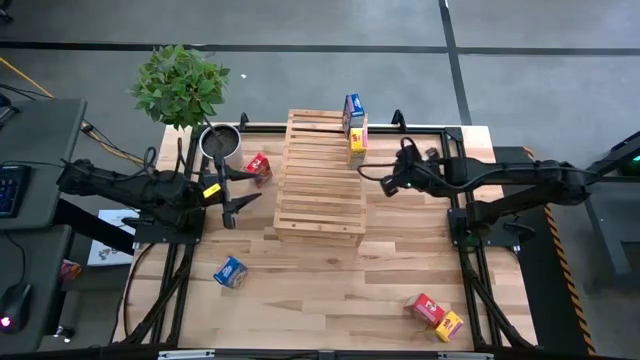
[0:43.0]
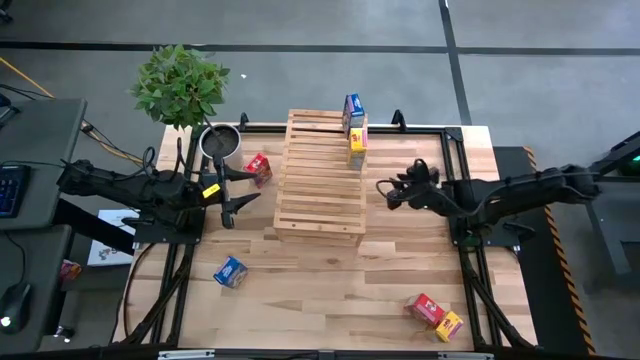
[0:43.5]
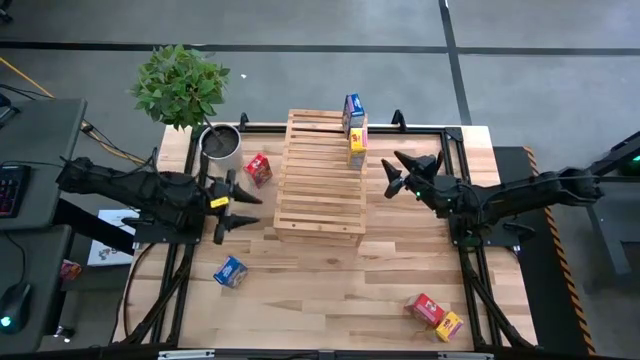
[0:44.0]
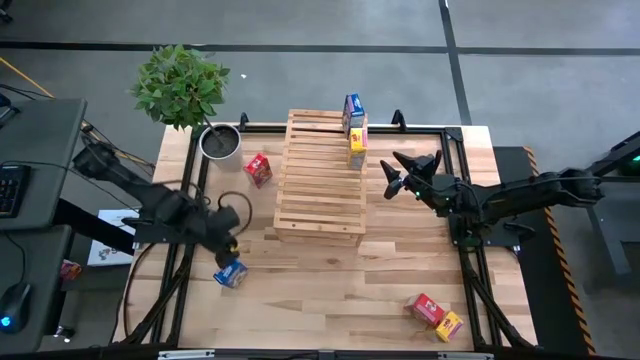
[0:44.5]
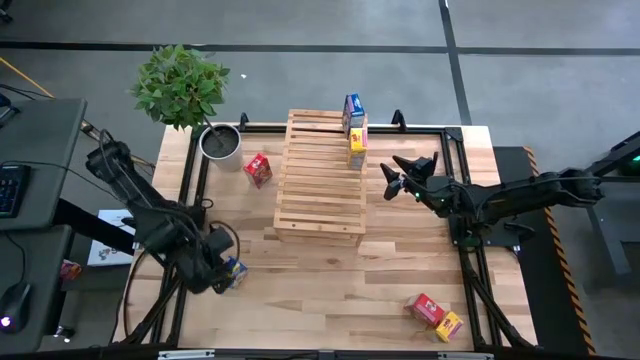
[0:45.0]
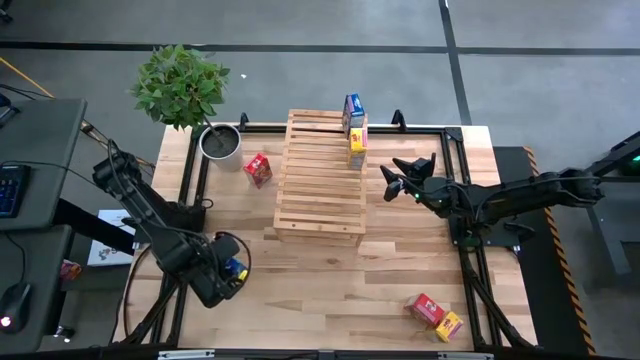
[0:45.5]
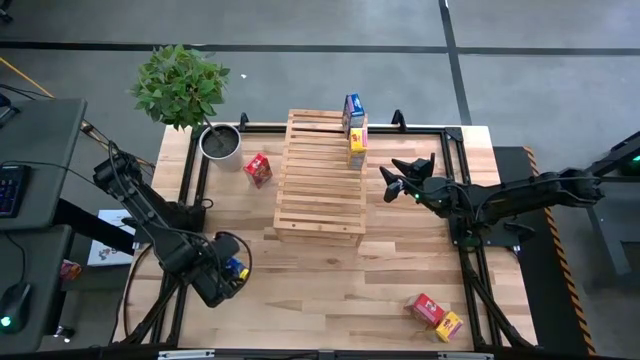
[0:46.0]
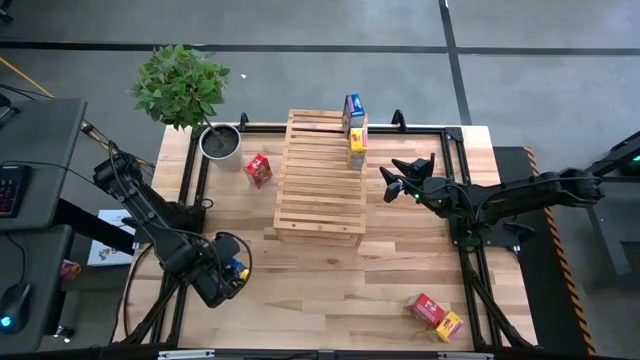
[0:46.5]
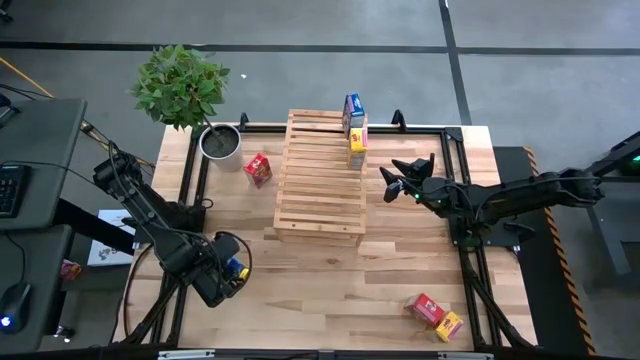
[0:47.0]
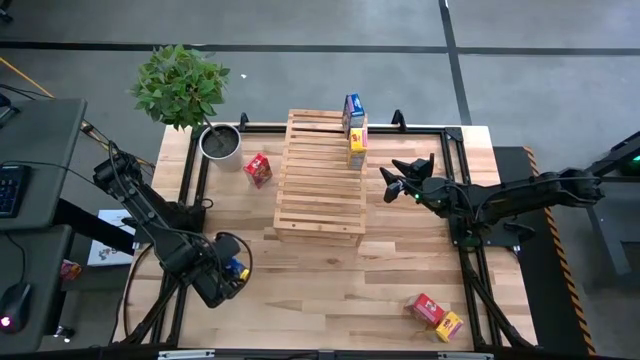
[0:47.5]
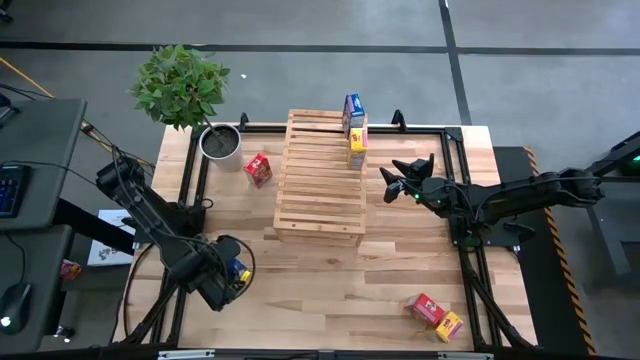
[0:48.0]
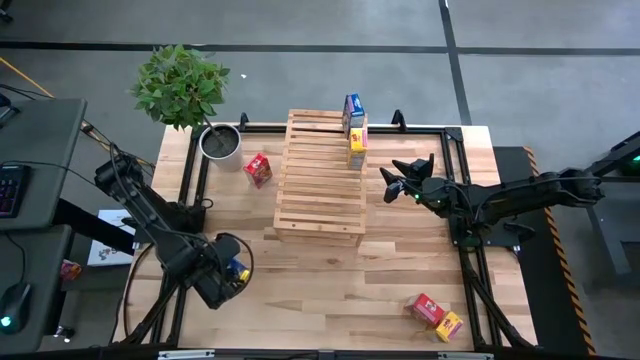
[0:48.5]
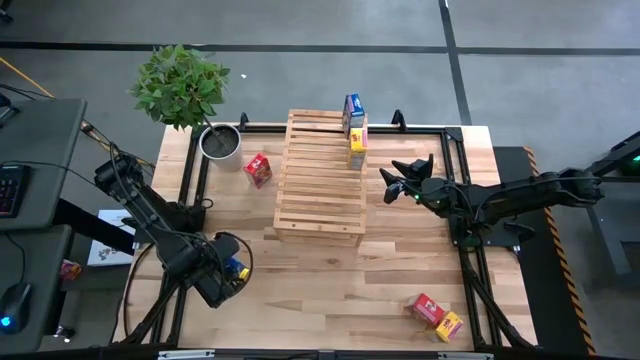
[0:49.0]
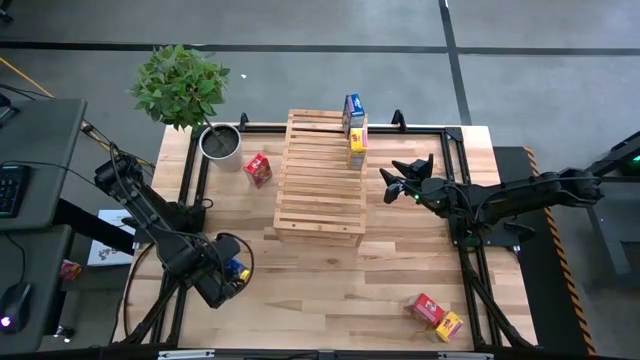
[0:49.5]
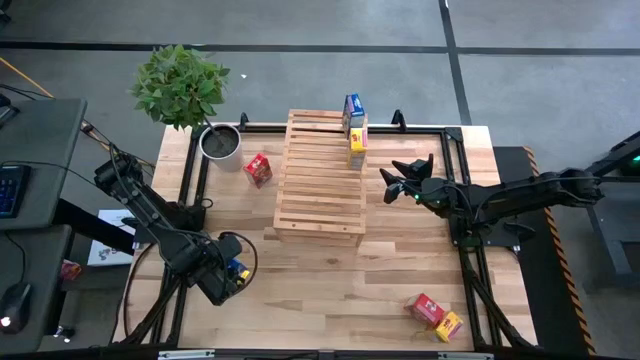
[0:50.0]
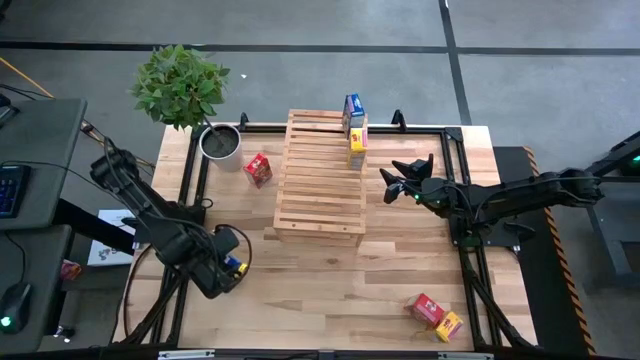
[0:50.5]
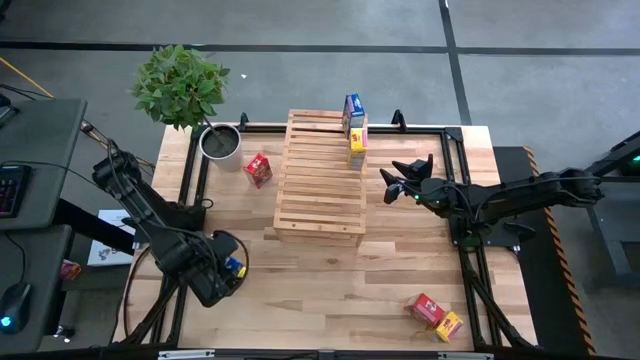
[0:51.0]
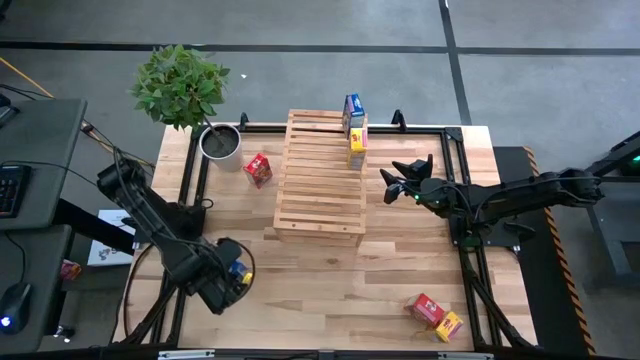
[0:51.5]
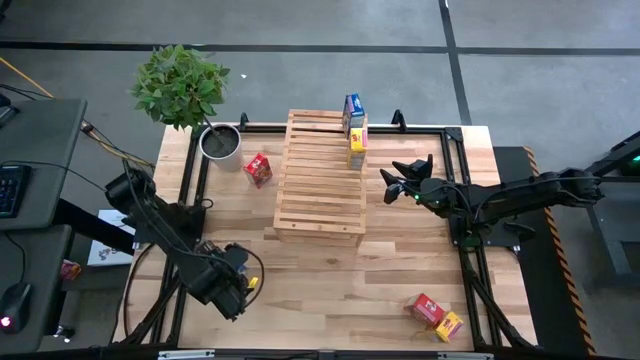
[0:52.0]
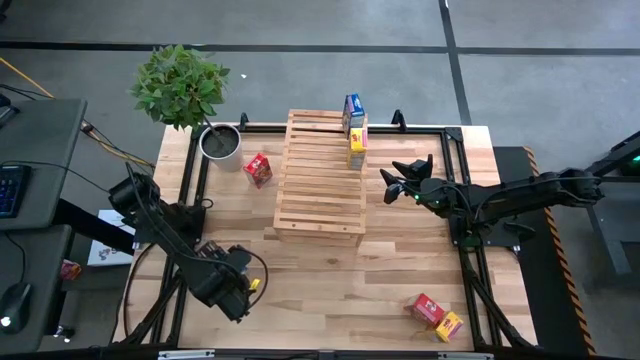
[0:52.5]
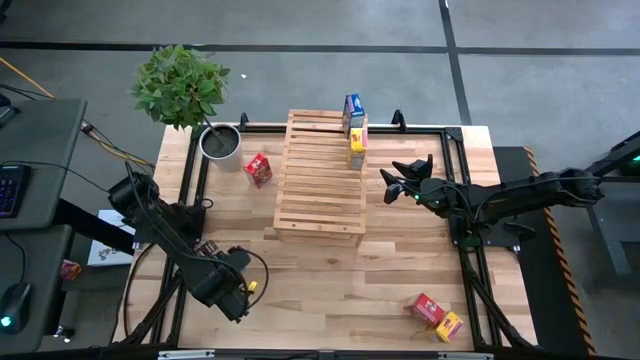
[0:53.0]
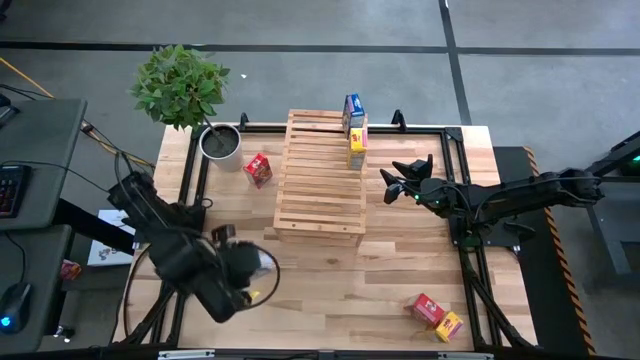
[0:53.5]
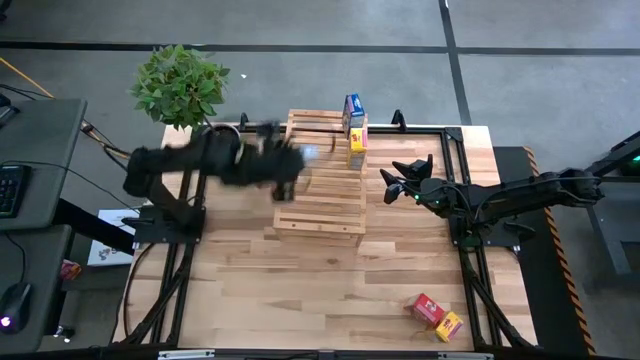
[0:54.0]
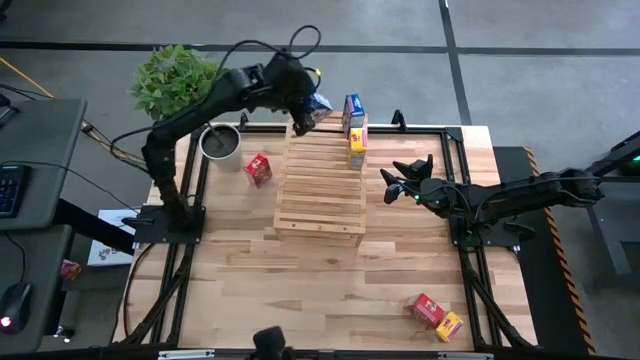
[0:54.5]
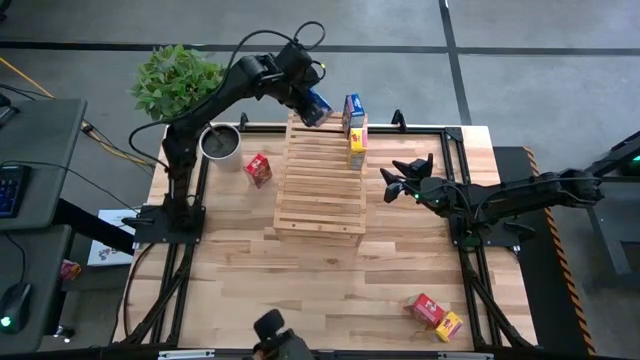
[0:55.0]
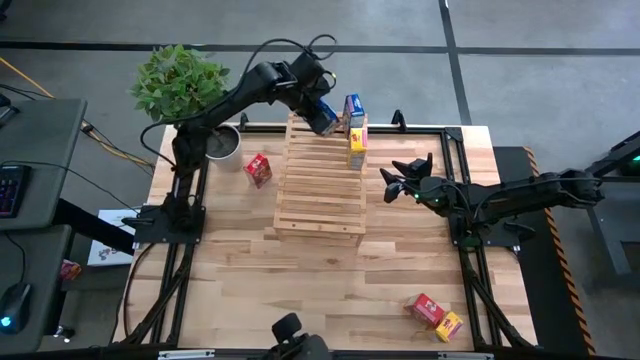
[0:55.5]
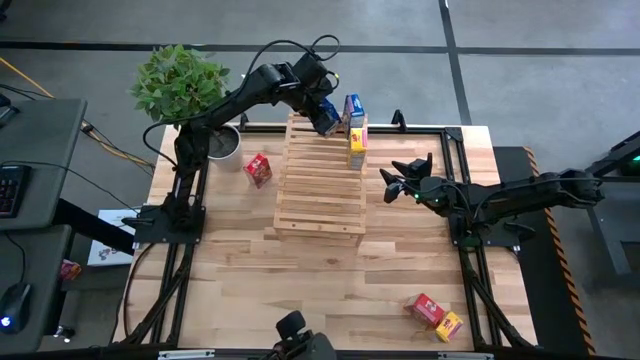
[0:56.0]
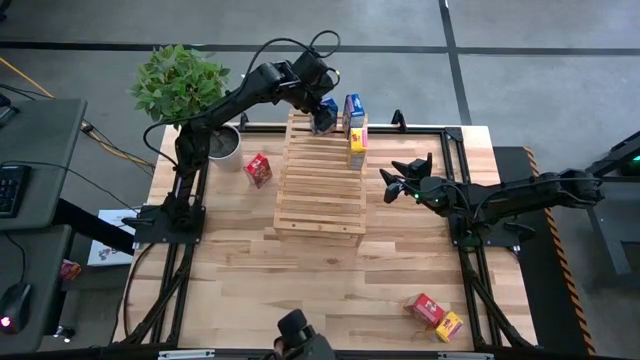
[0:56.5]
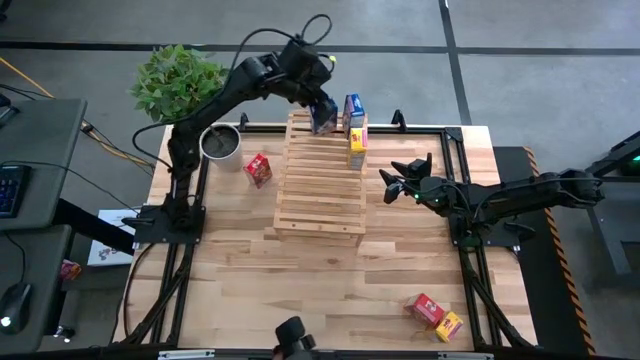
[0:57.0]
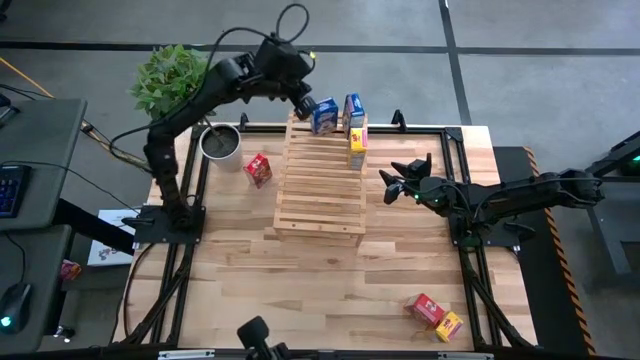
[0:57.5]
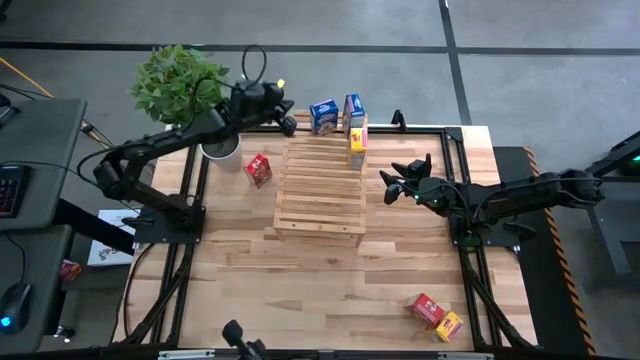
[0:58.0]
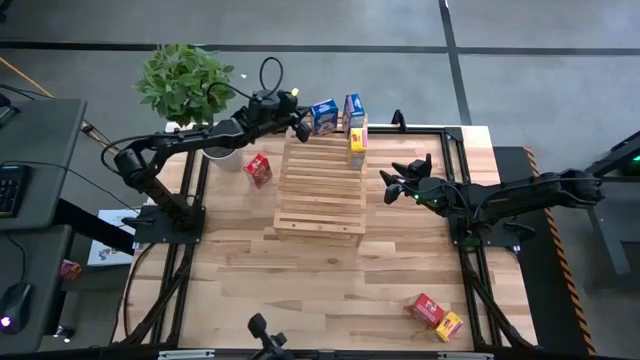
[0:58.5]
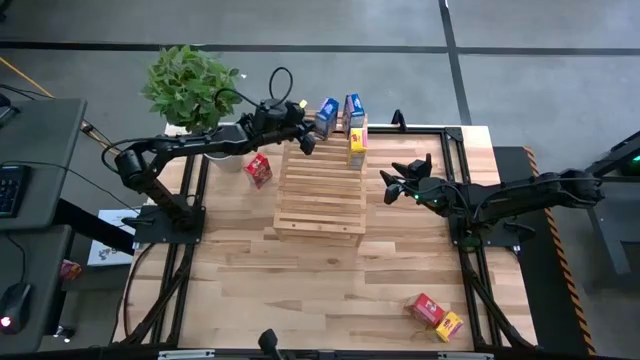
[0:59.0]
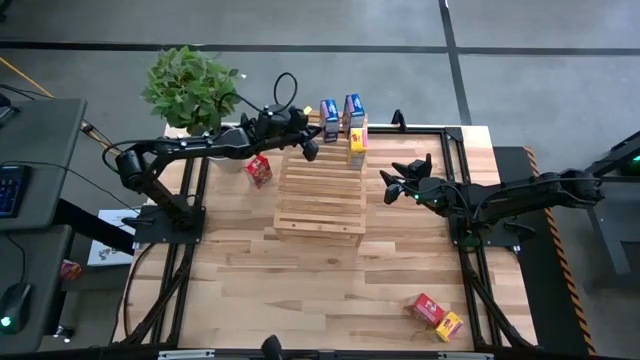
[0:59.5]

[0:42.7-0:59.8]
Task: Stack cereal on shelf
Put the blue cereal box on the shelf aligned with the other blue cereal box

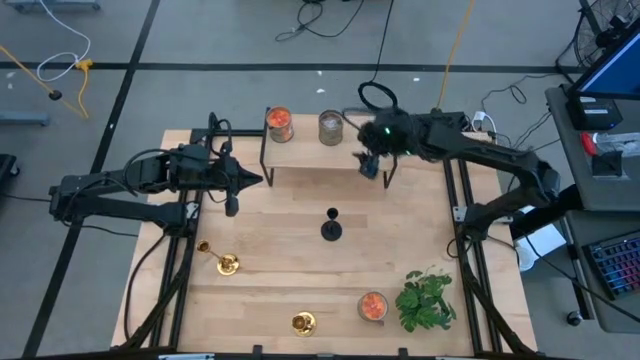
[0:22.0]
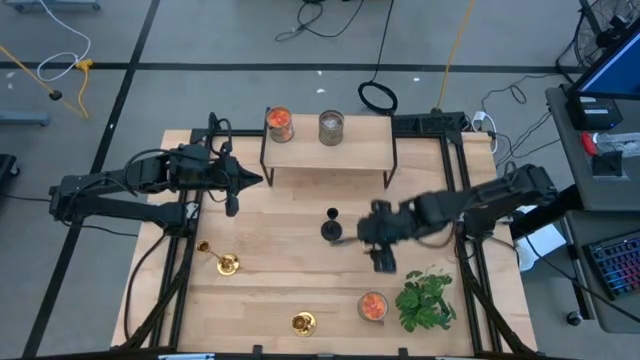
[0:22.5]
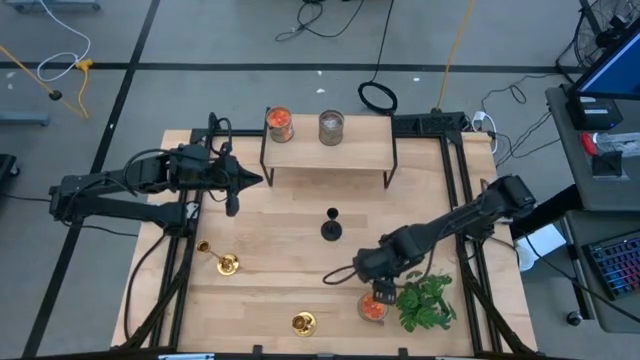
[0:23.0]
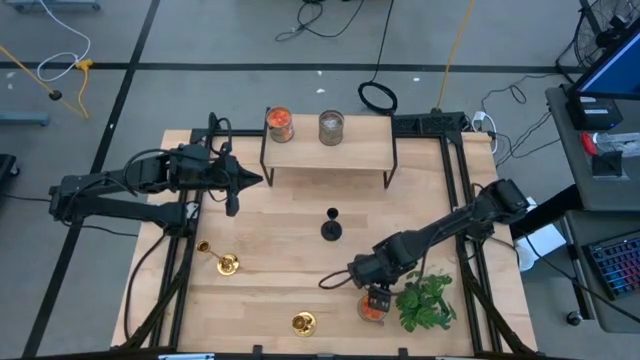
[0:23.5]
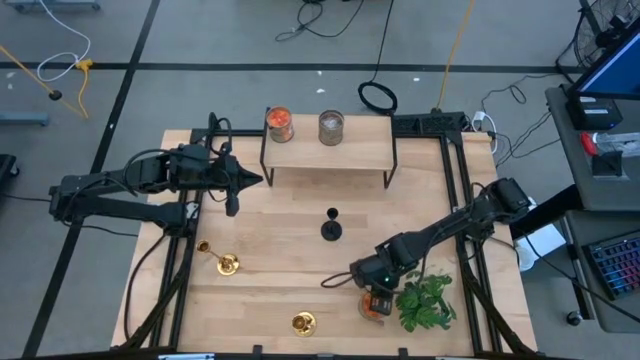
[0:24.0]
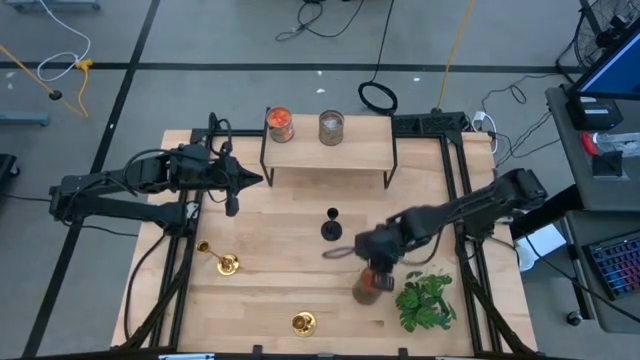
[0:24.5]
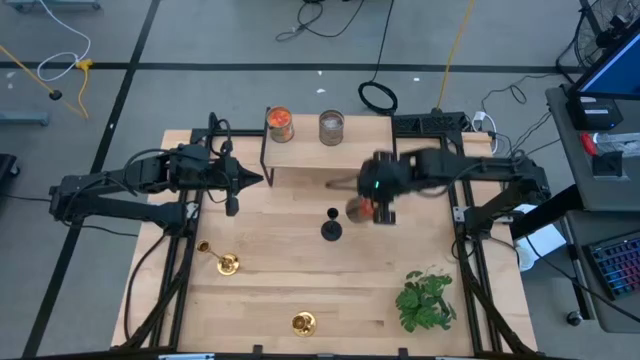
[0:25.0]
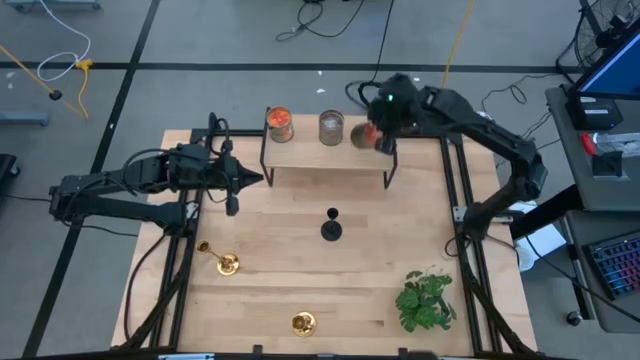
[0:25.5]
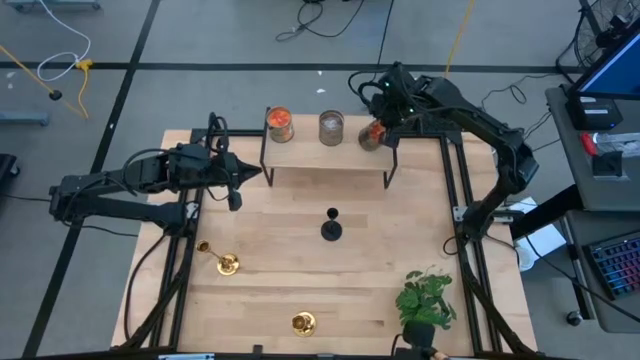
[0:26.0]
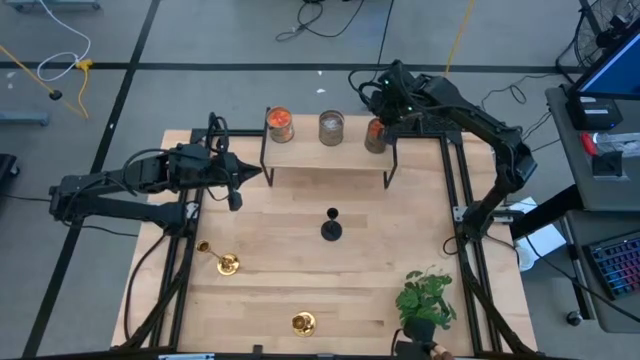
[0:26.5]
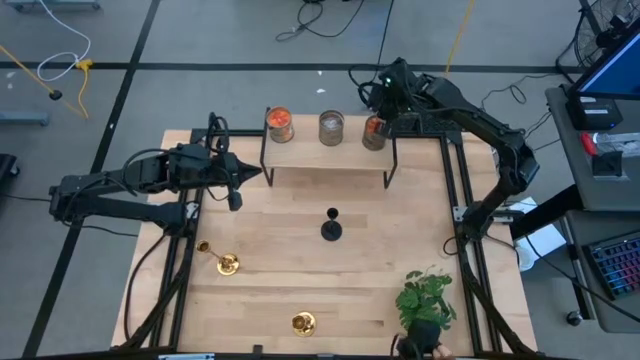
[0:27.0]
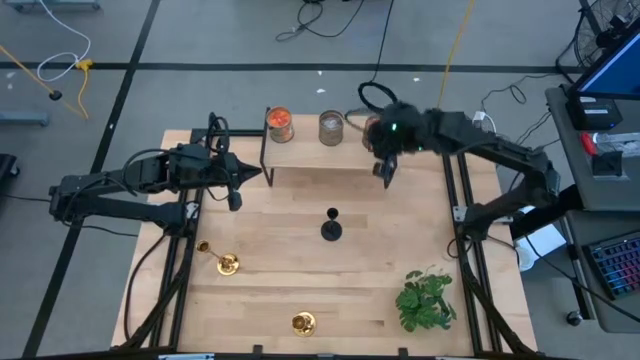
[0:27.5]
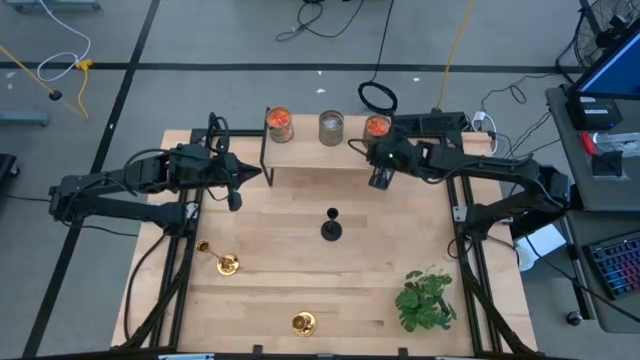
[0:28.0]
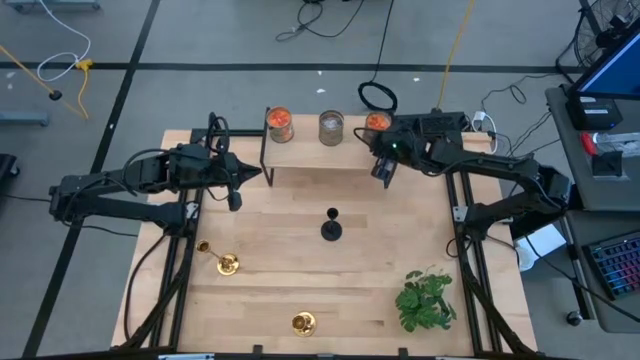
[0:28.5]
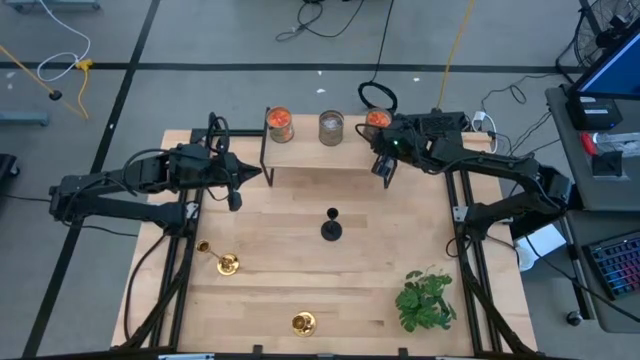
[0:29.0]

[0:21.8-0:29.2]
Task: Pick & Place candle stick holders
Align the orange scented candle with the other scented candles
